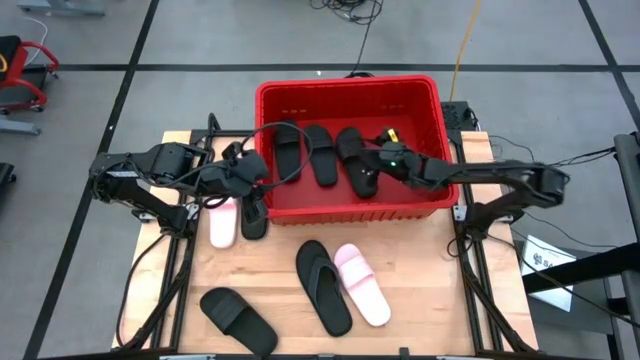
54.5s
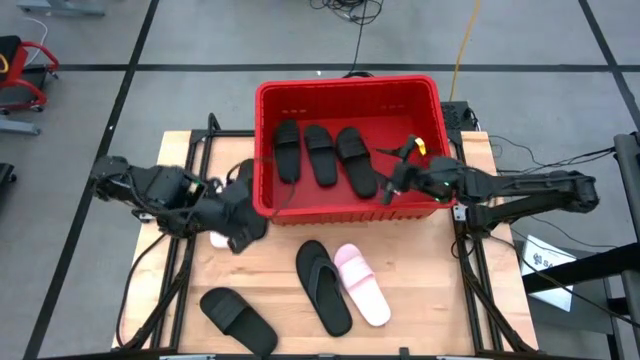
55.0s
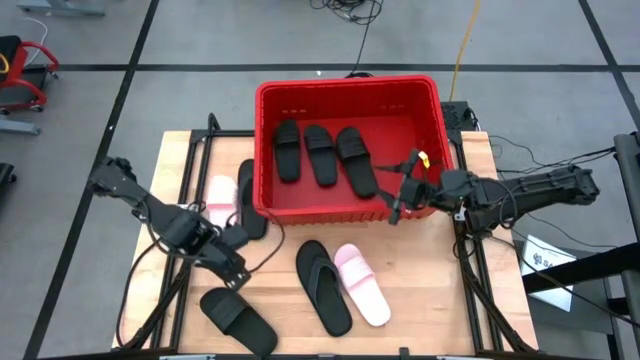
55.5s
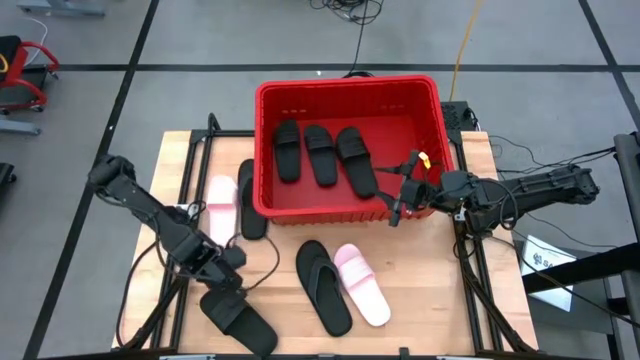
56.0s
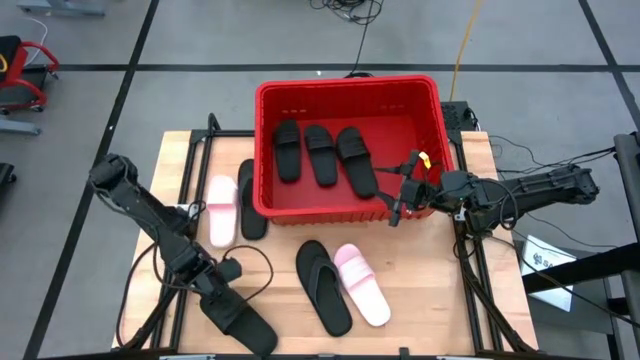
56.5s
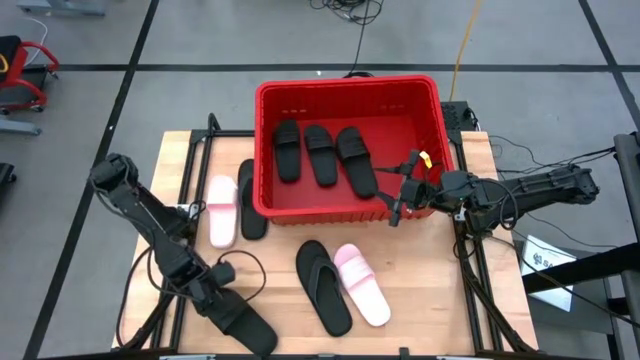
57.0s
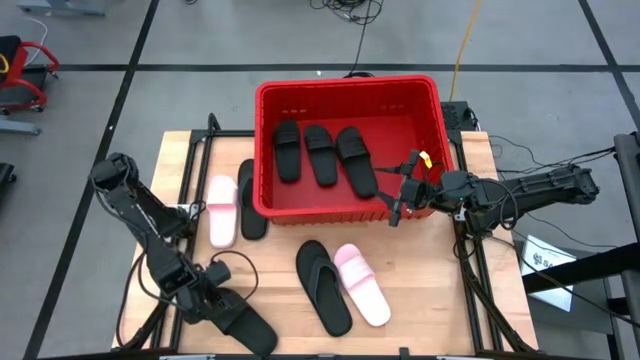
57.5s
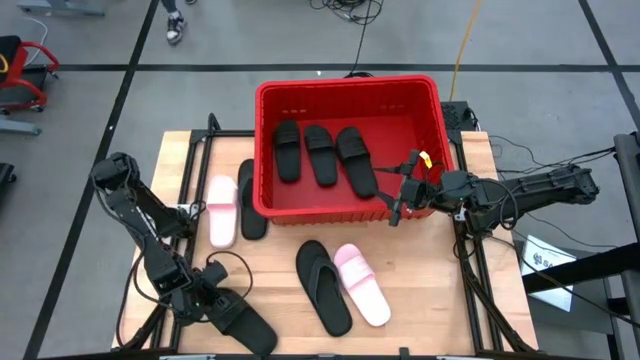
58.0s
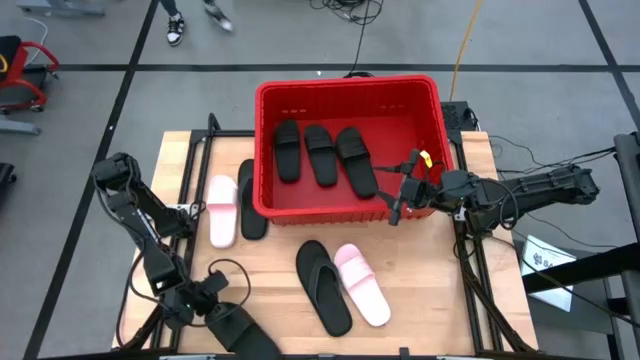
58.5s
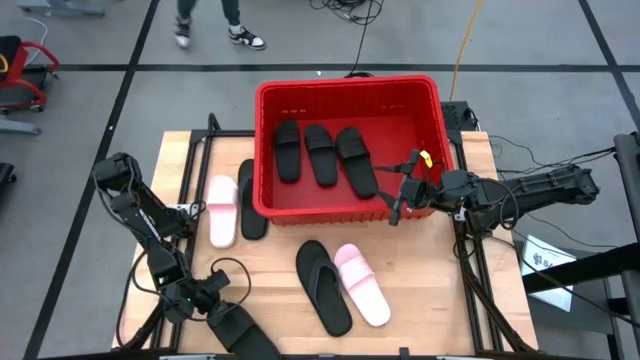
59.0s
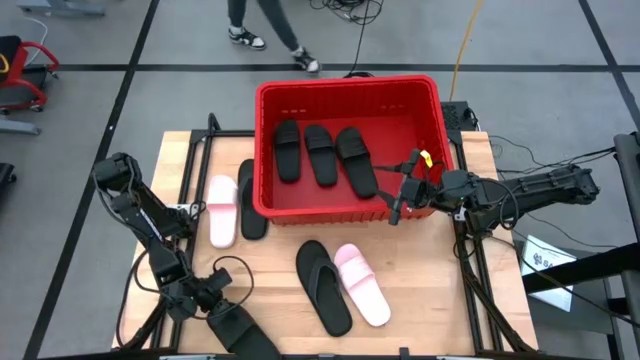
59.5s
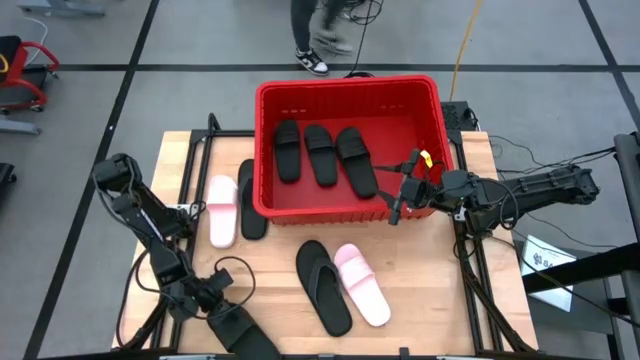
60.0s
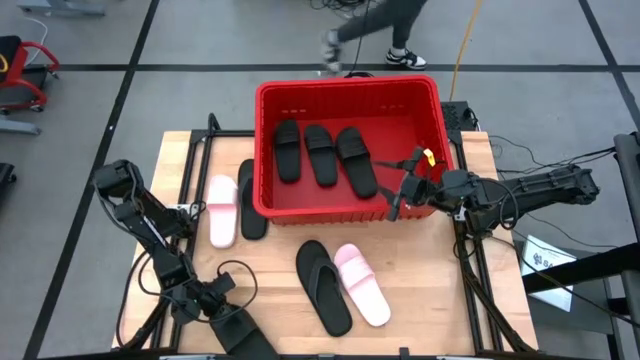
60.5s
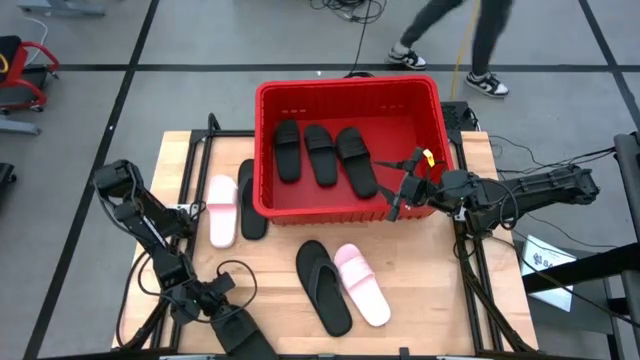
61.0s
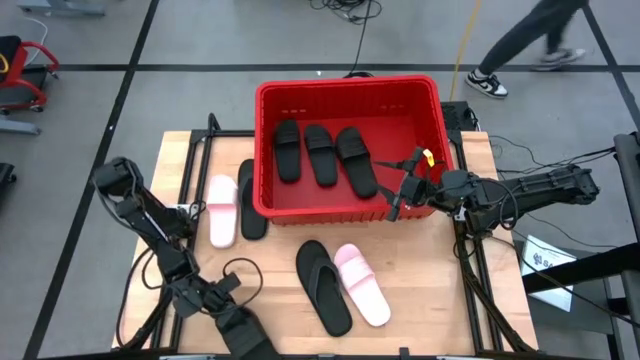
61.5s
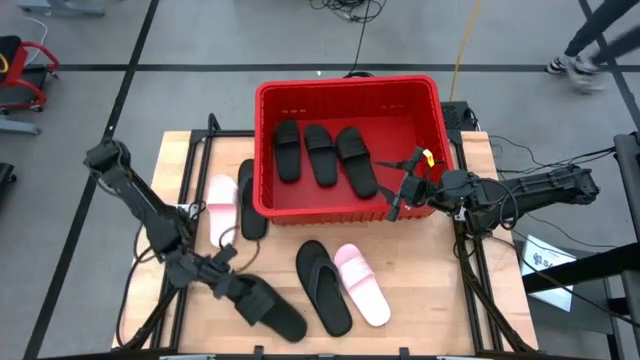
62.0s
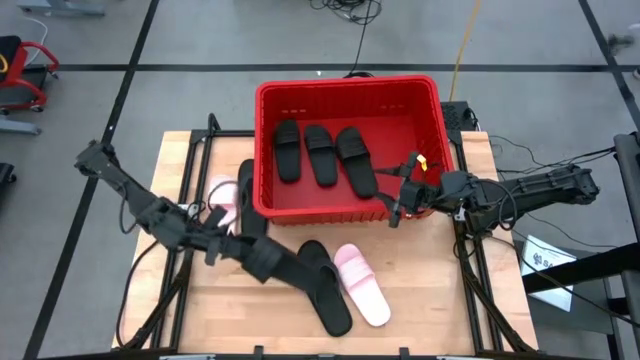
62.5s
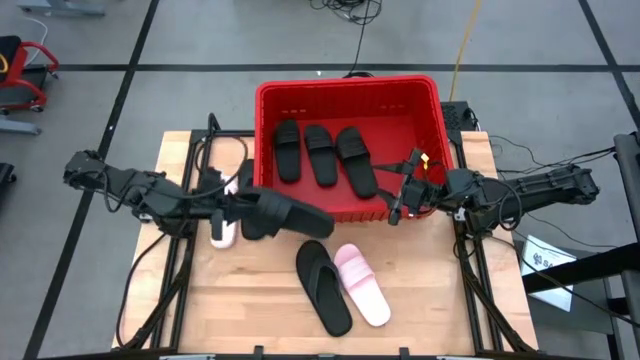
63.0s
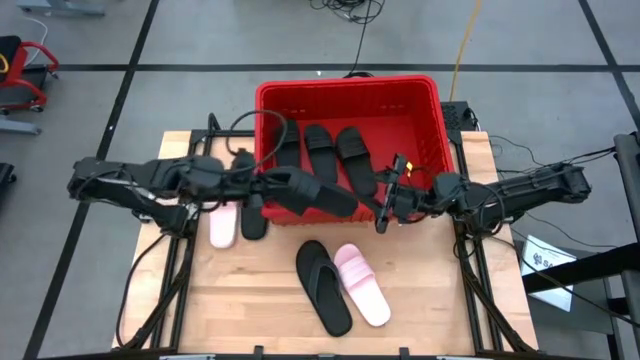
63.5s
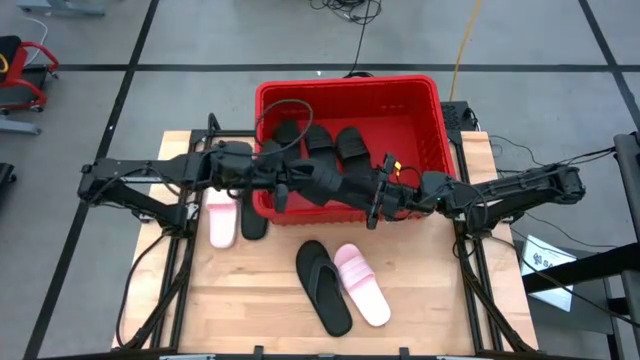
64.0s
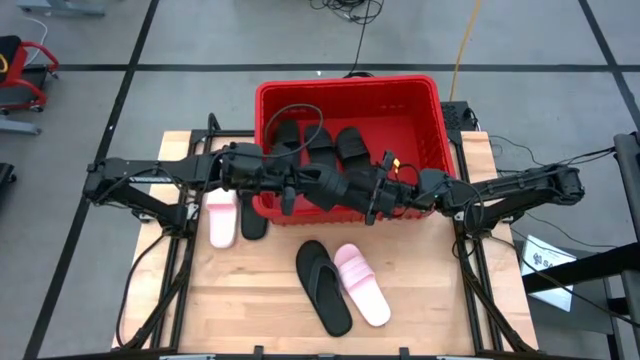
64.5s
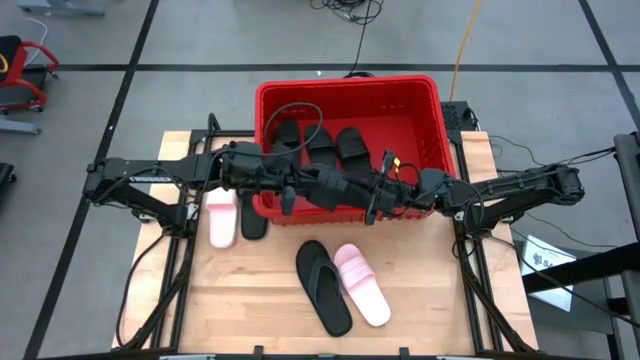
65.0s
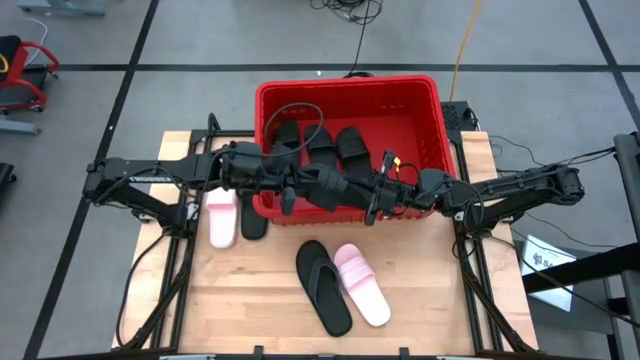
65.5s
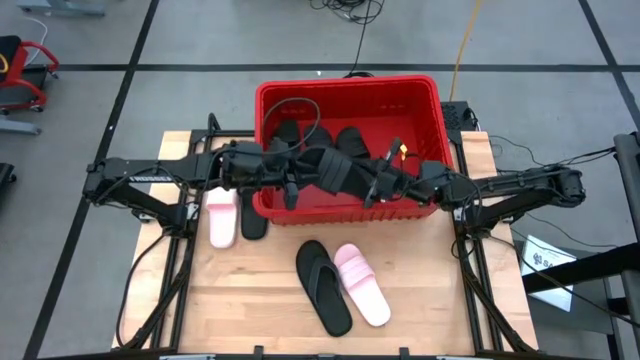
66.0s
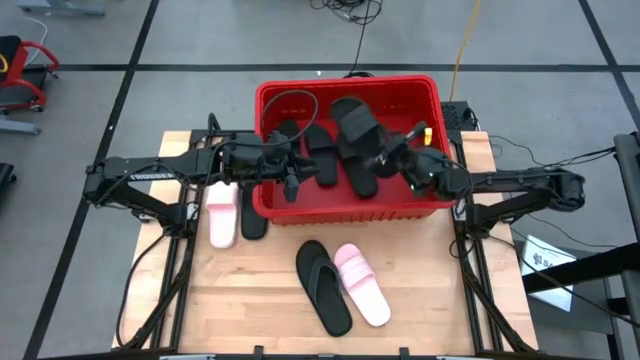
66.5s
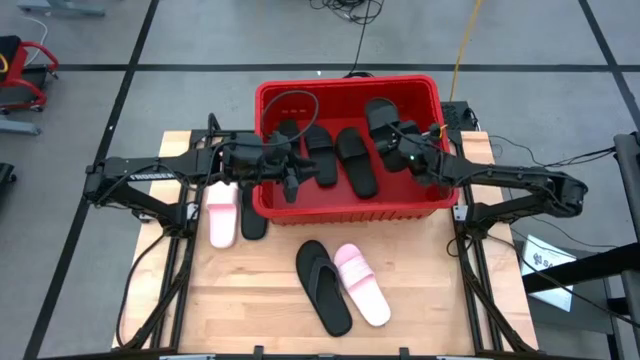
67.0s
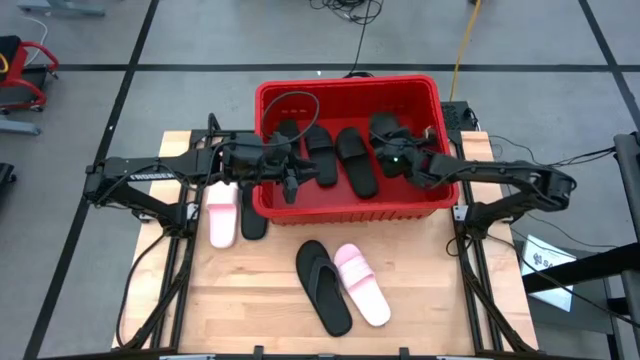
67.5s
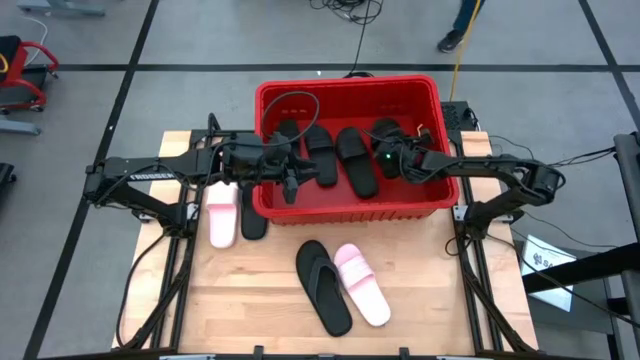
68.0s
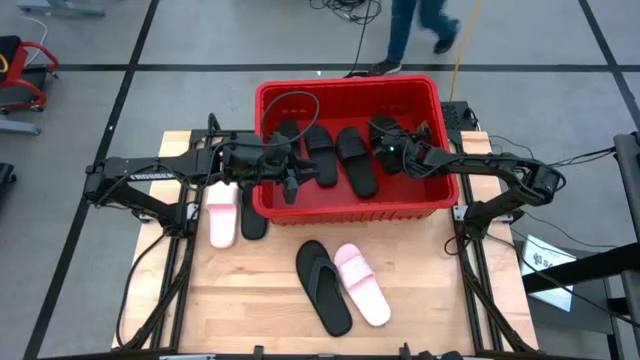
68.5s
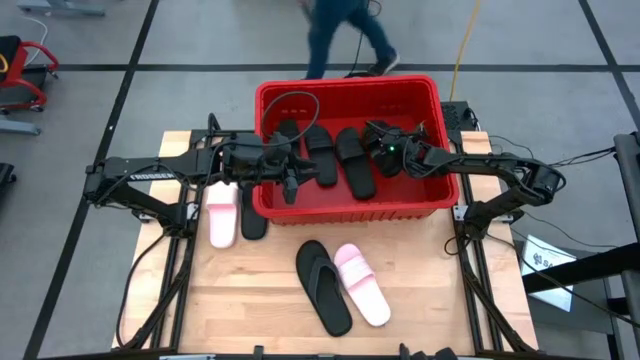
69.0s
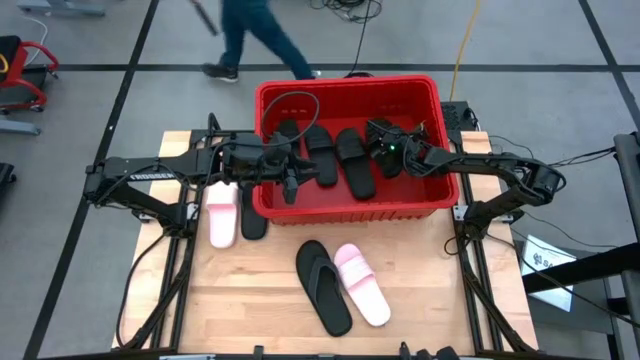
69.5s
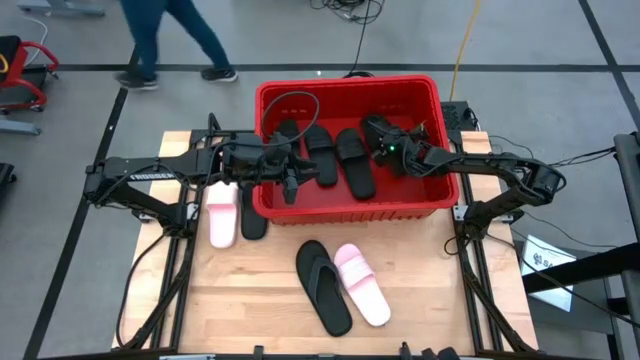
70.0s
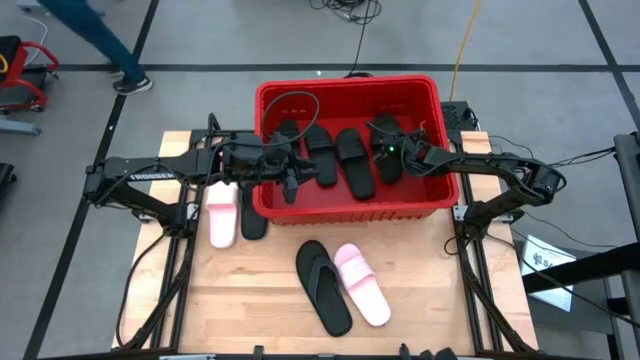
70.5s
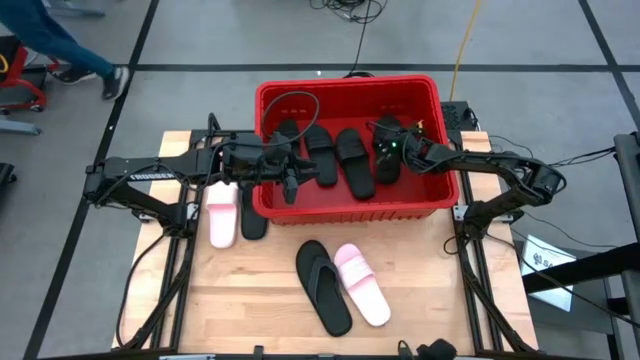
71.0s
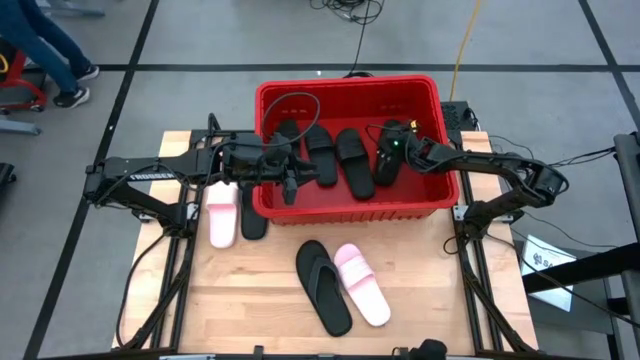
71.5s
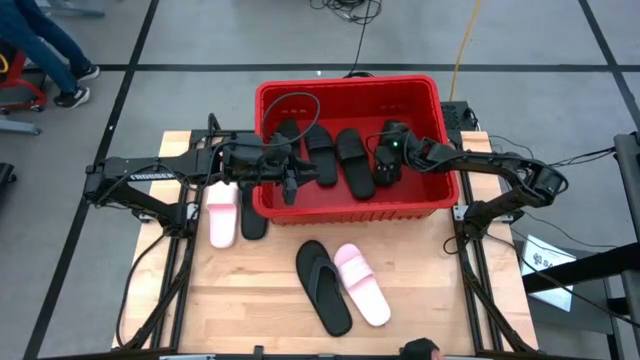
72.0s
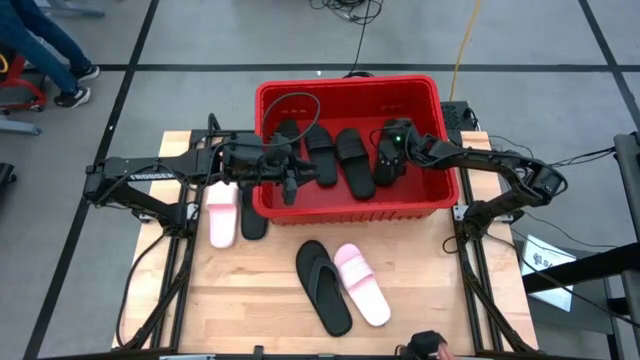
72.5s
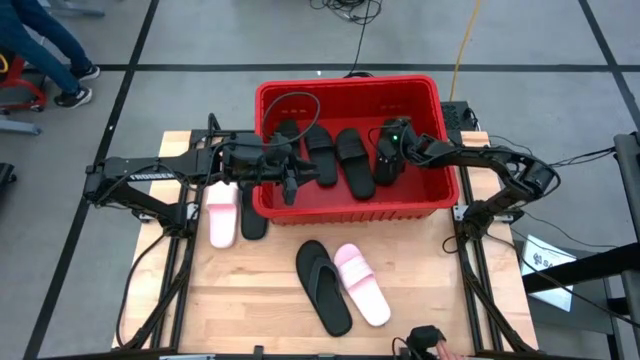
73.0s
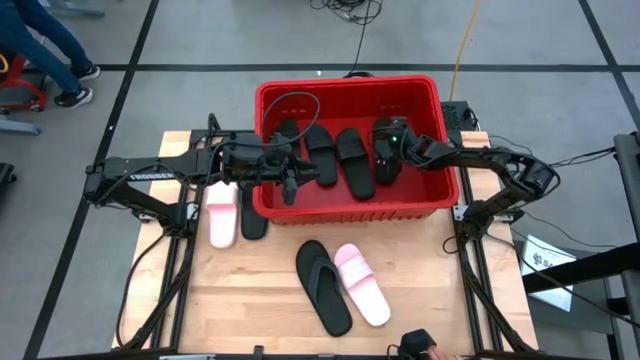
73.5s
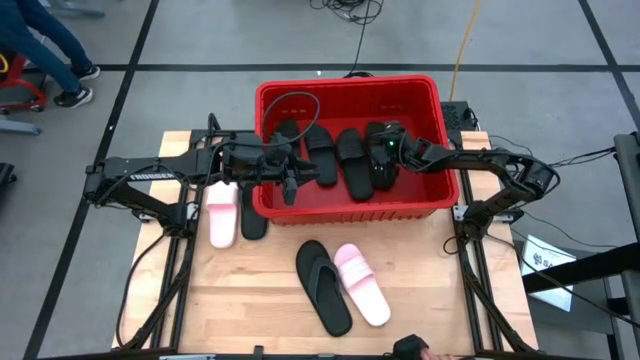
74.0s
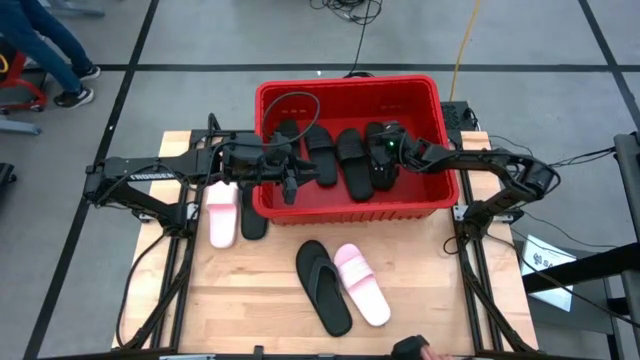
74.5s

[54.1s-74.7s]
Task: Pick and place slides into bin
Put the black slide into the red bin
